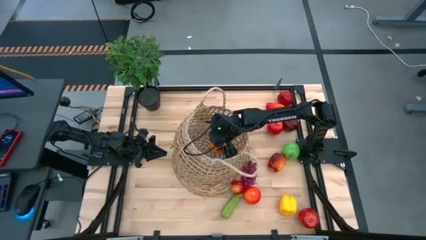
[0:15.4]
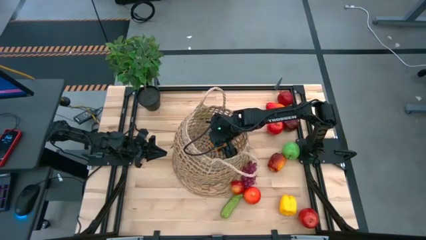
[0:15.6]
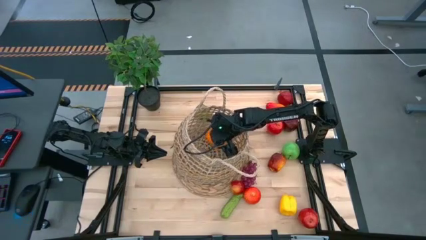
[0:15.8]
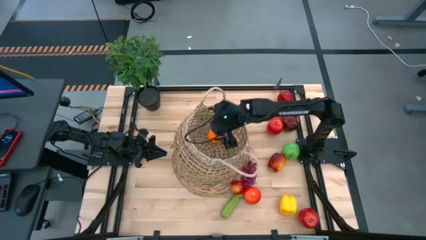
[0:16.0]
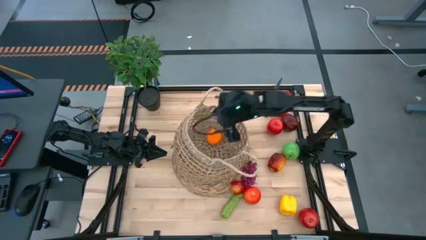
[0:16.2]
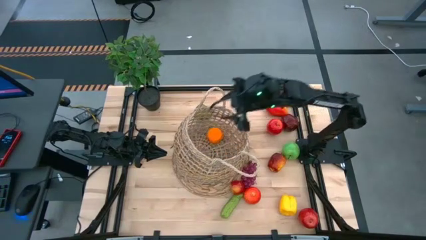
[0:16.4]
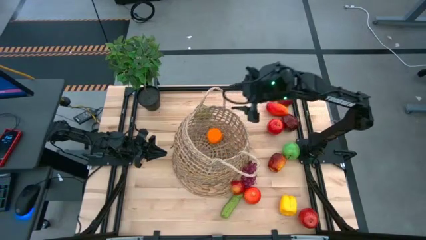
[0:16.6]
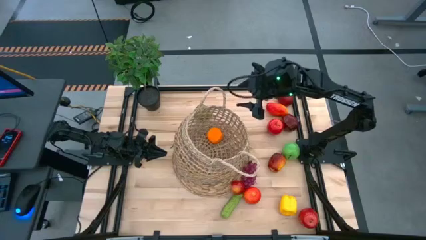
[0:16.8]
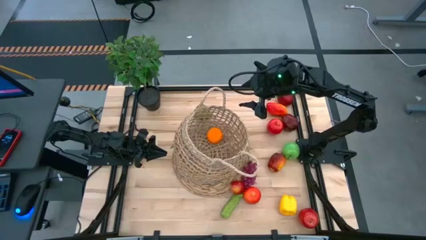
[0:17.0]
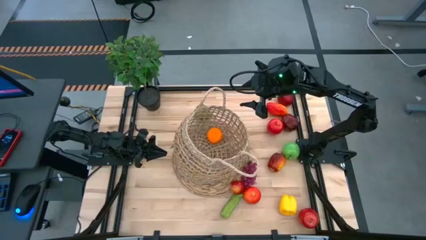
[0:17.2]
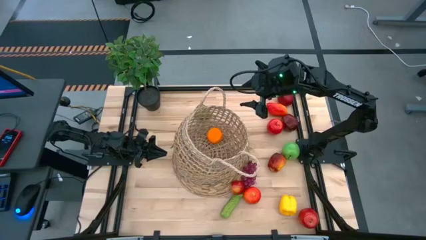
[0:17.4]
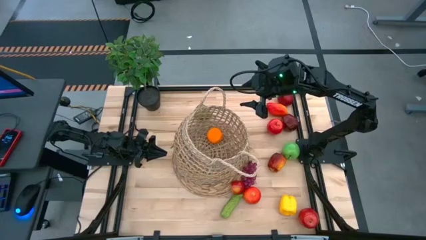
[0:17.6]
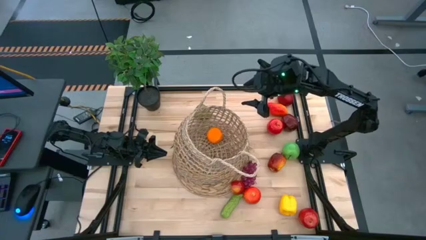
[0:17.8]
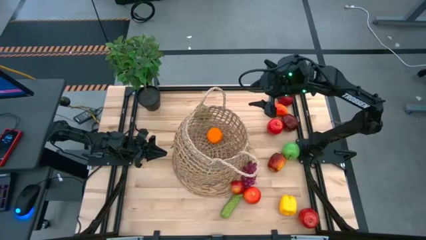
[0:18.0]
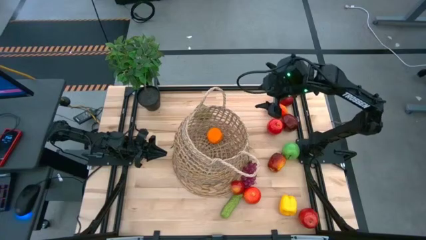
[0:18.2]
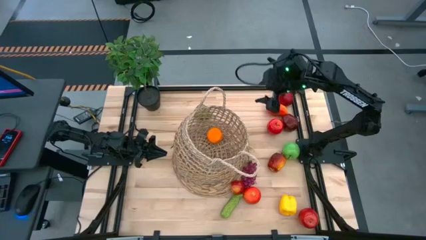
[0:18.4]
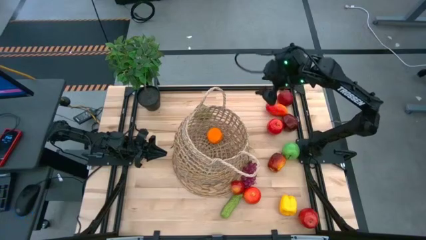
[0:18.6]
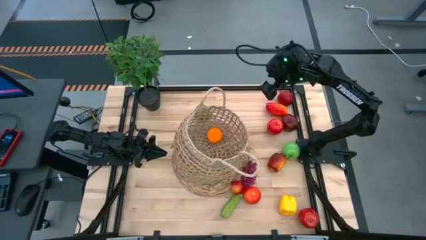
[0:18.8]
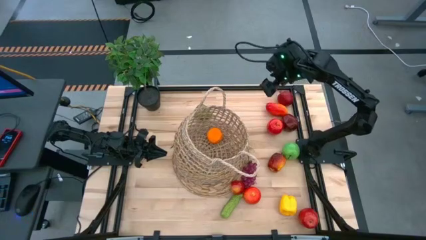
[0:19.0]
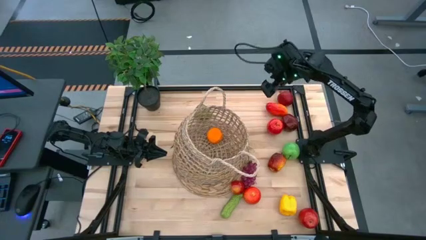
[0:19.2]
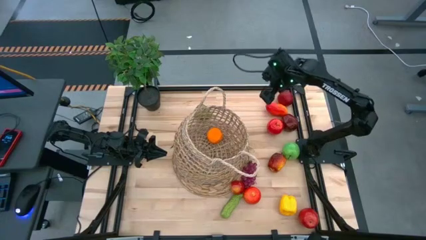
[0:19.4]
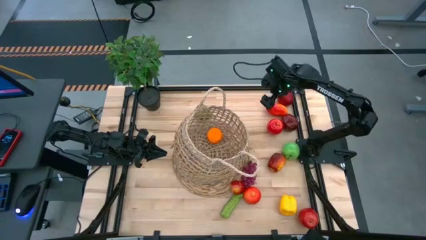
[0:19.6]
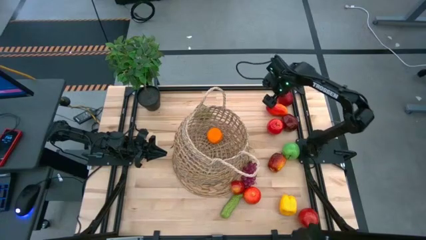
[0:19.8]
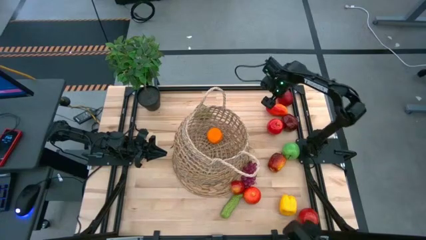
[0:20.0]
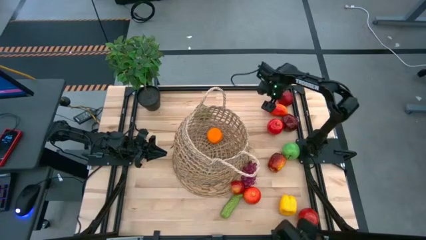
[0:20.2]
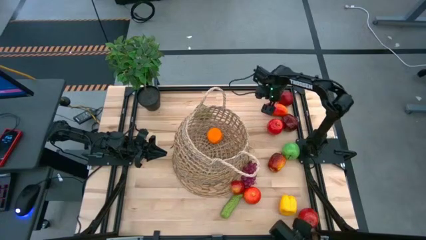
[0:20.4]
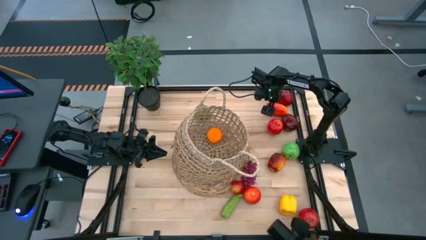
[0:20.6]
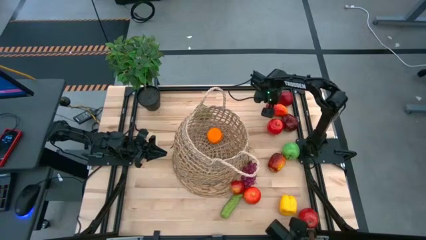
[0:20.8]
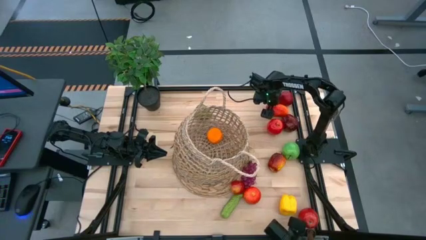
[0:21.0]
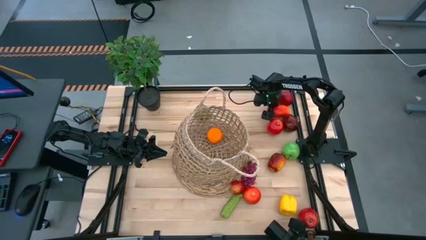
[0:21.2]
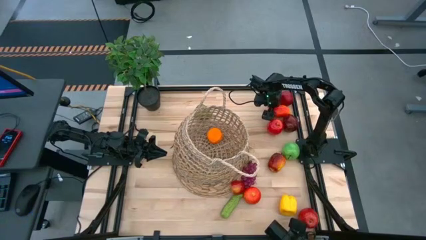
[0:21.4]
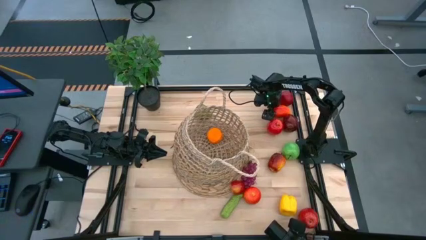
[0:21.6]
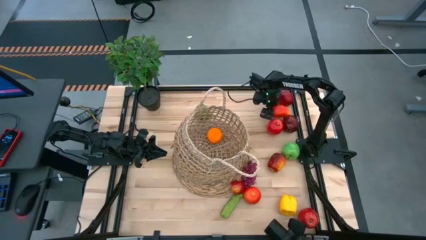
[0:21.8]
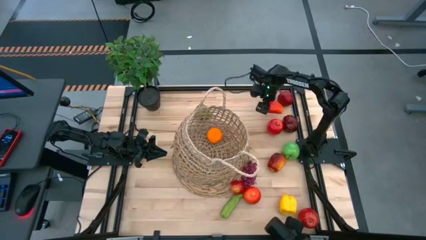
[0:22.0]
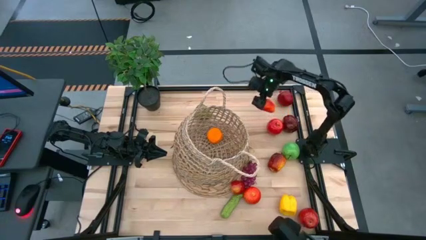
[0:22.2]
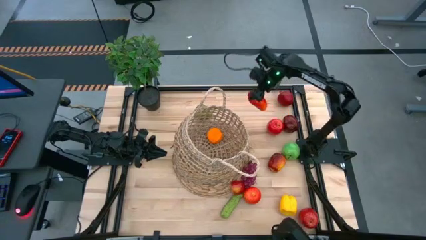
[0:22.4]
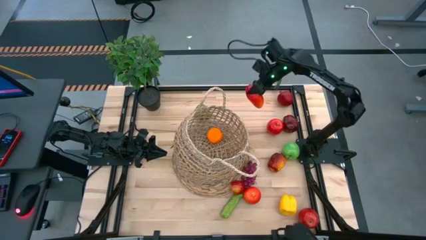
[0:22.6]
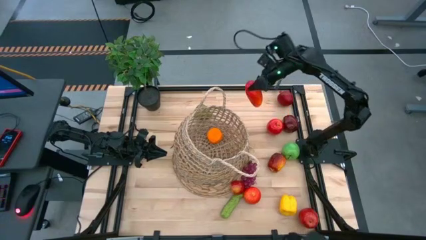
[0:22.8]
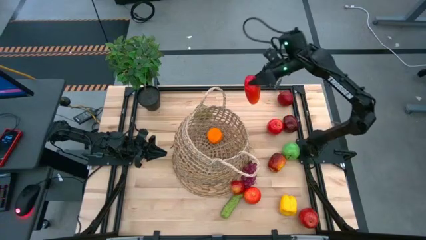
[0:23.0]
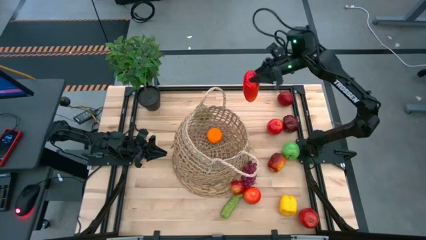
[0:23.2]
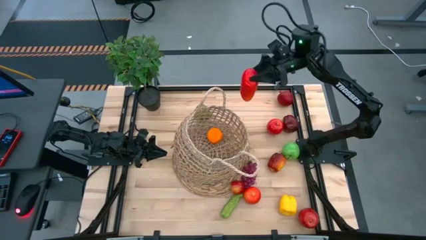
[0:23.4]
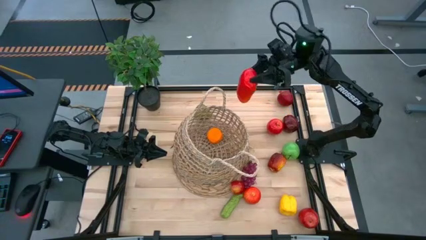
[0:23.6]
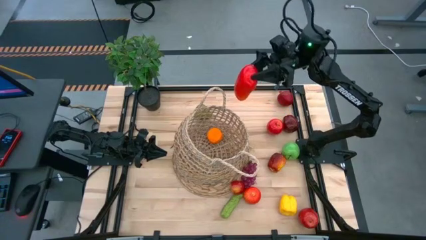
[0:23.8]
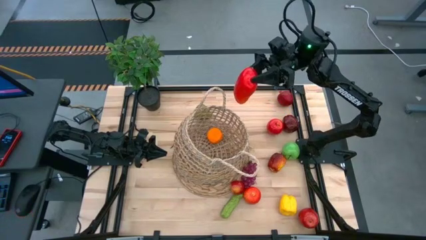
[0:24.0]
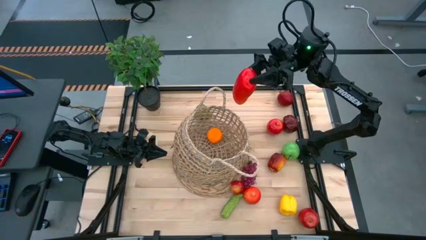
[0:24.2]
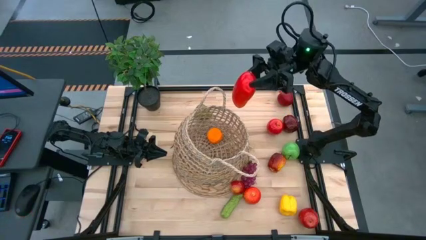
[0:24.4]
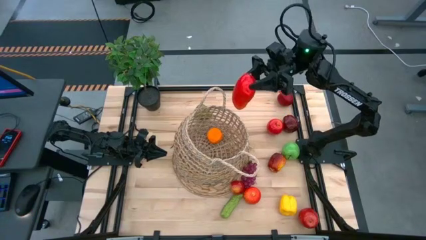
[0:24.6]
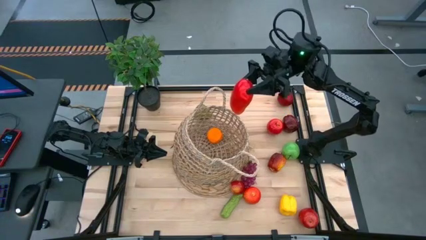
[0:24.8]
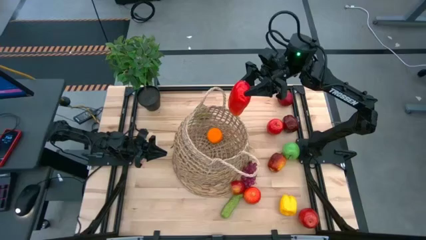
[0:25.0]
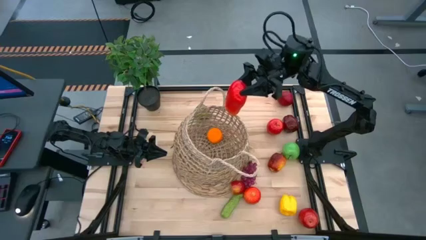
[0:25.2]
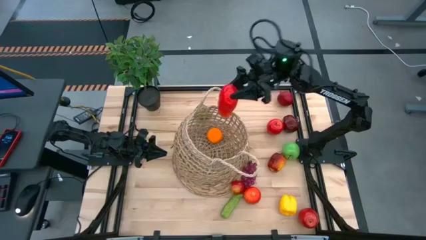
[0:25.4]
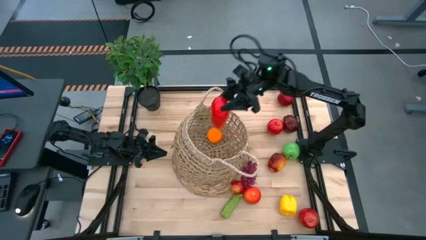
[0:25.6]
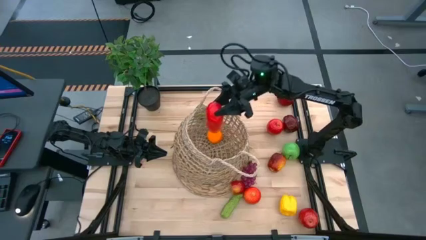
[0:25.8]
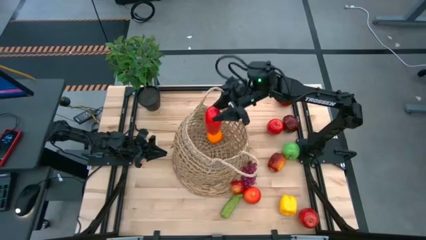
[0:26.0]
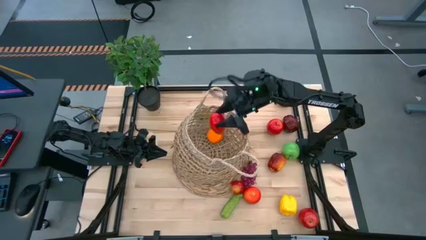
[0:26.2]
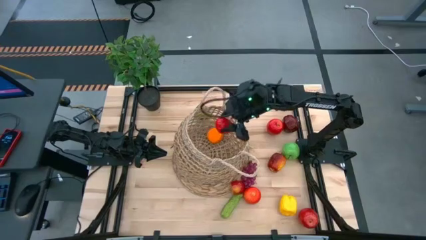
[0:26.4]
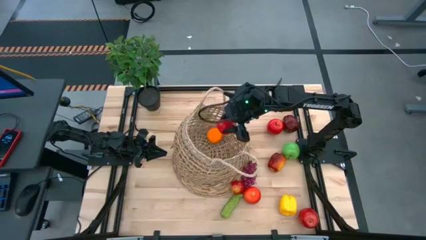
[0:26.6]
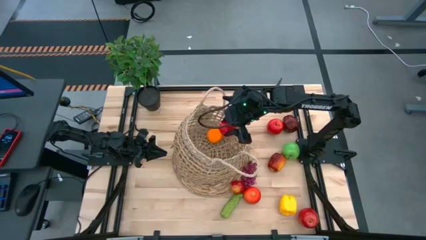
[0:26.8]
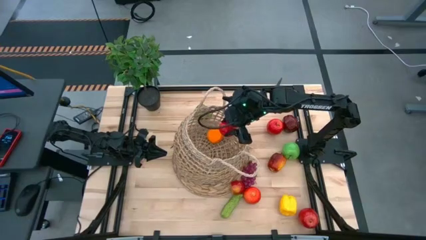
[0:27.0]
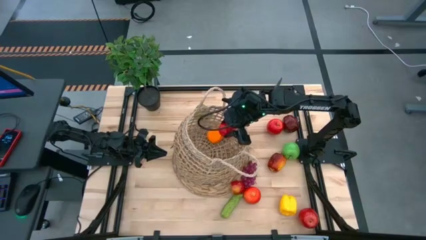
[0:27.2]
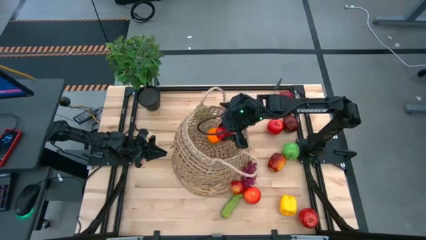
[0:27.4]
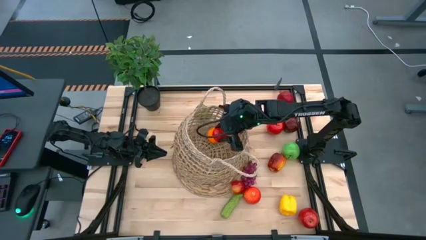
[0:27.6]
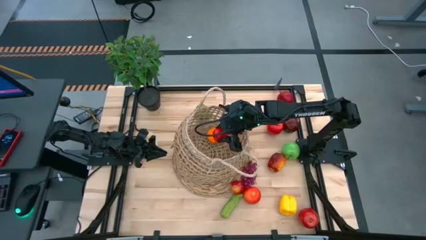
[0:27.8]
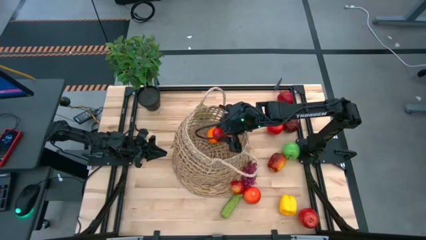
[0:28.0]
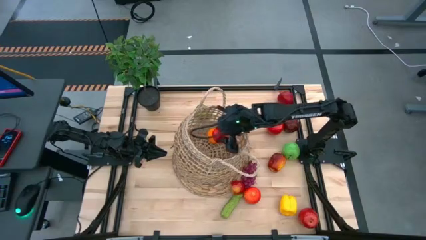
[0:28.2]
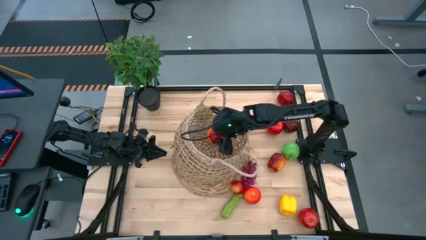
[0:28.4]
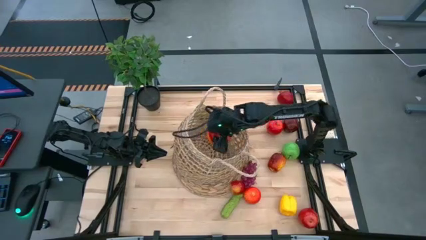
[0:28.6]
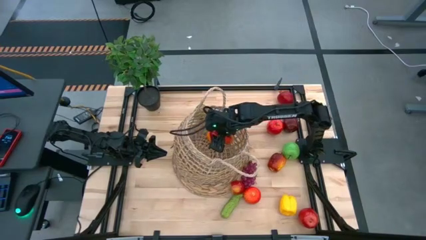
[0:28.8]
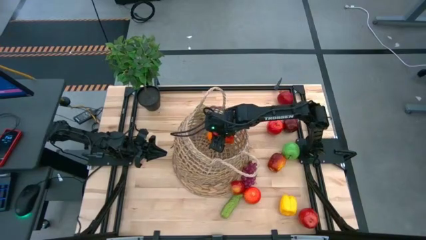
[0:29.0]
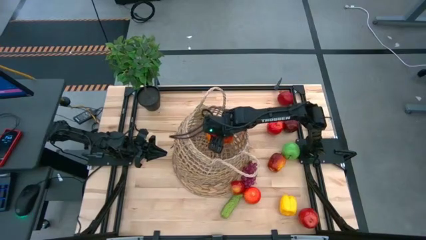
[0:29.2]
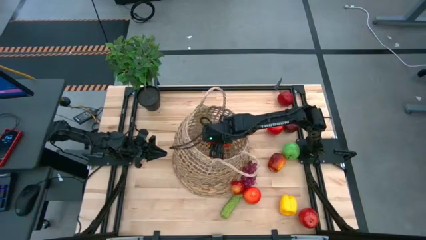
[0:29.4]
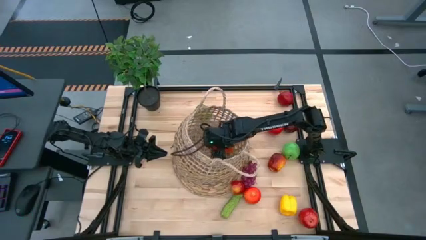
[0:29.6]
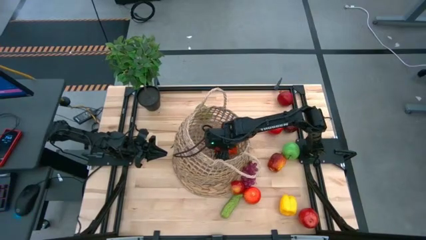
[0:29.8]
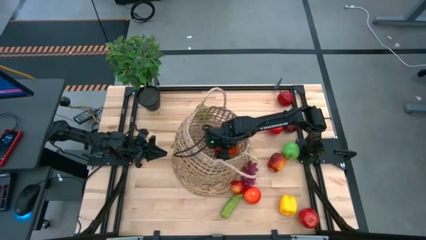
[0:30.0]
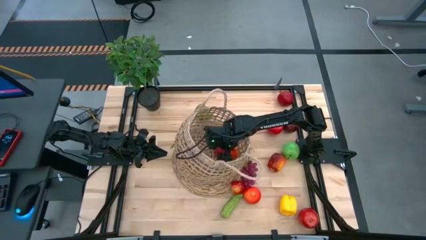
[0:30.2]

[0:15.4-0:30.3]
Task: Build produce basket
Put the red mango into the brown basket
